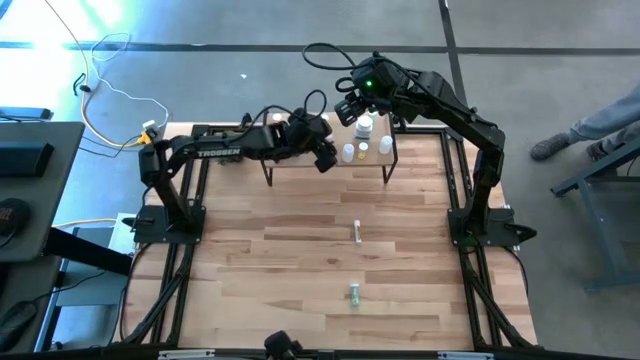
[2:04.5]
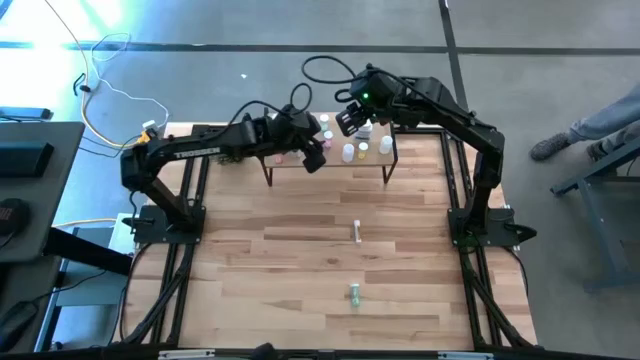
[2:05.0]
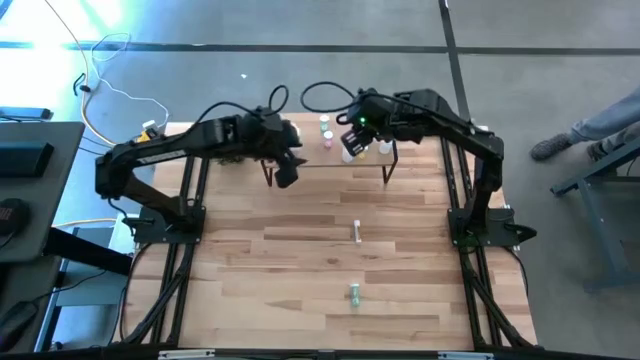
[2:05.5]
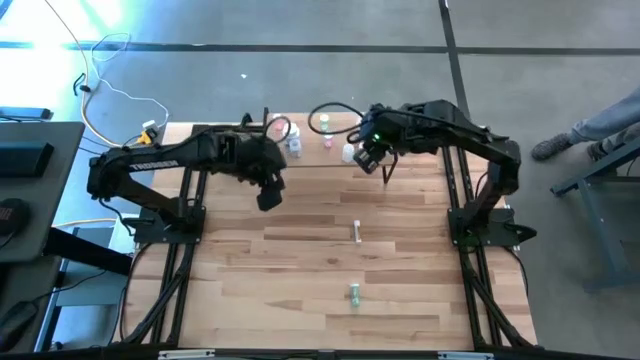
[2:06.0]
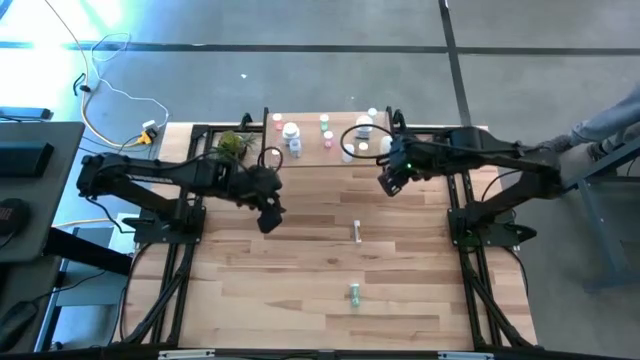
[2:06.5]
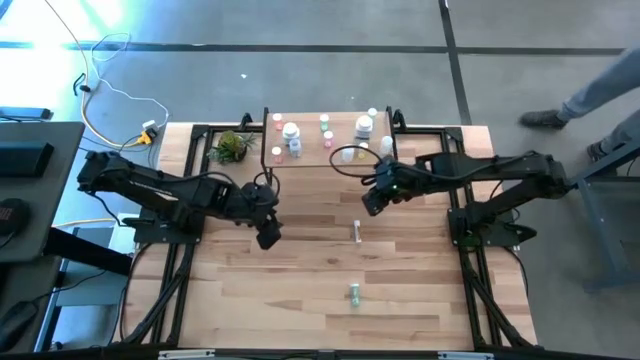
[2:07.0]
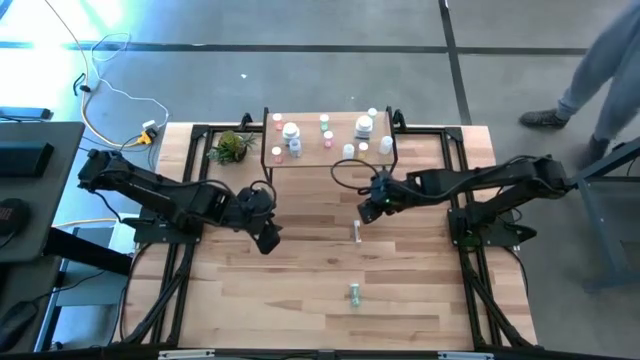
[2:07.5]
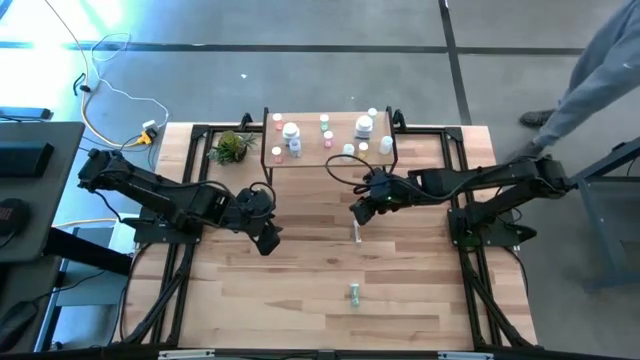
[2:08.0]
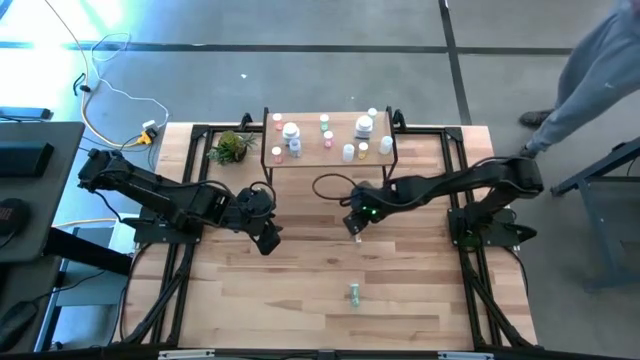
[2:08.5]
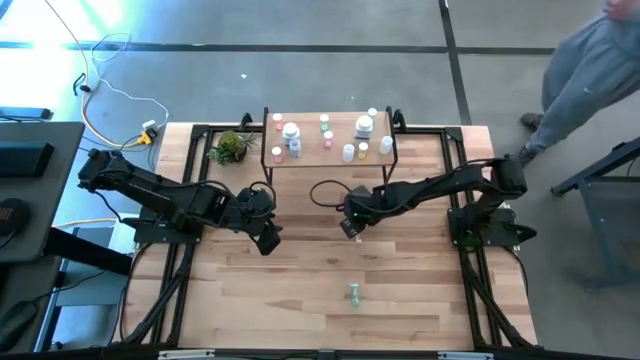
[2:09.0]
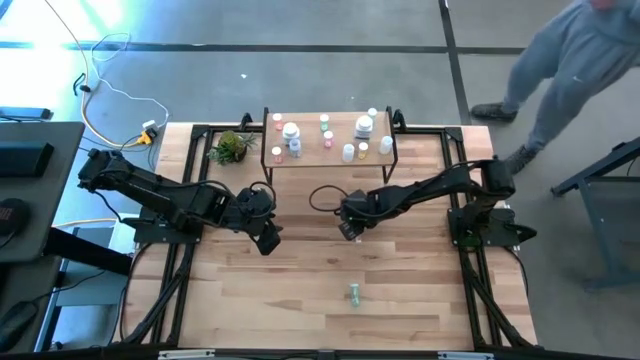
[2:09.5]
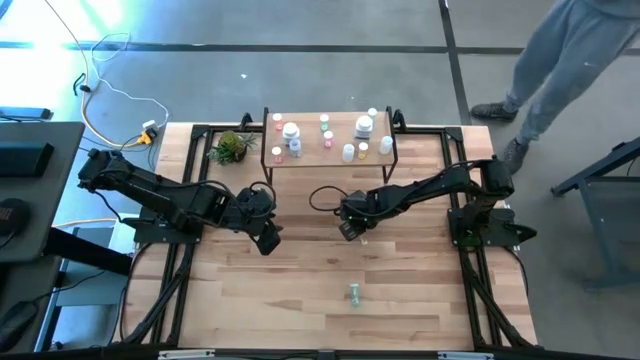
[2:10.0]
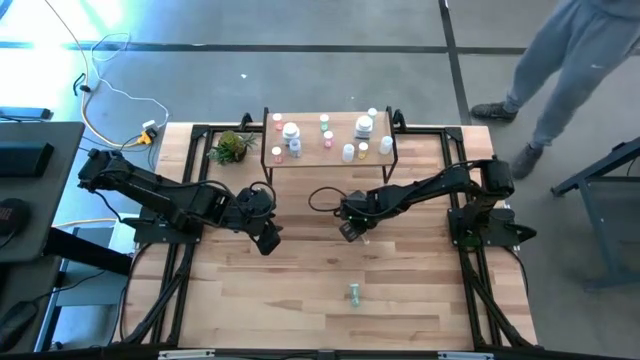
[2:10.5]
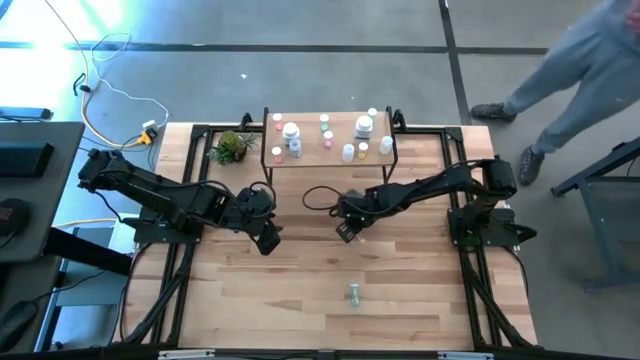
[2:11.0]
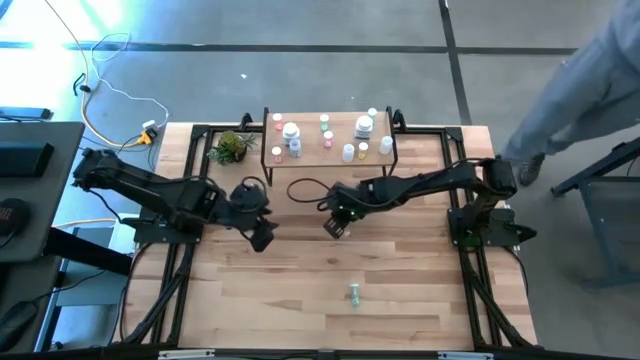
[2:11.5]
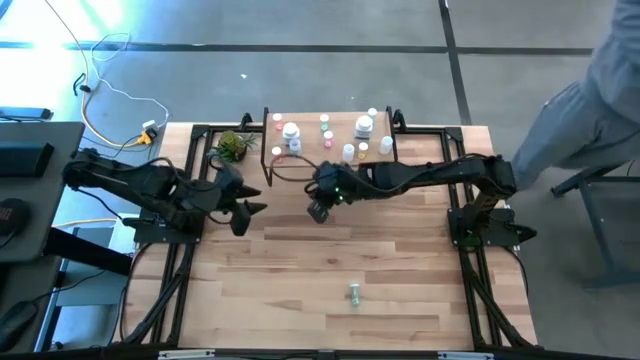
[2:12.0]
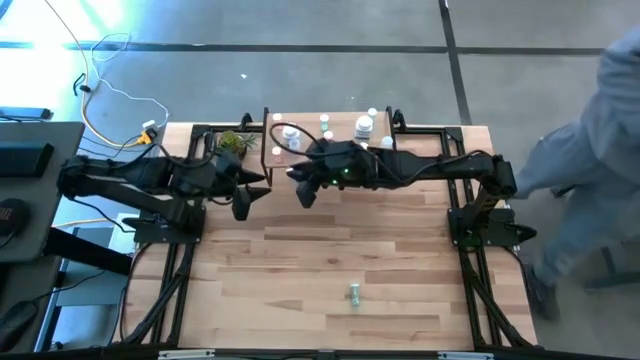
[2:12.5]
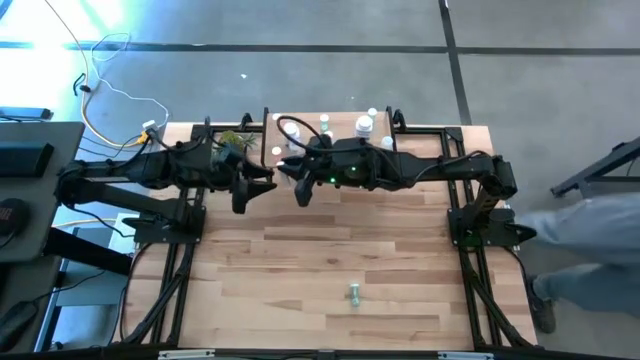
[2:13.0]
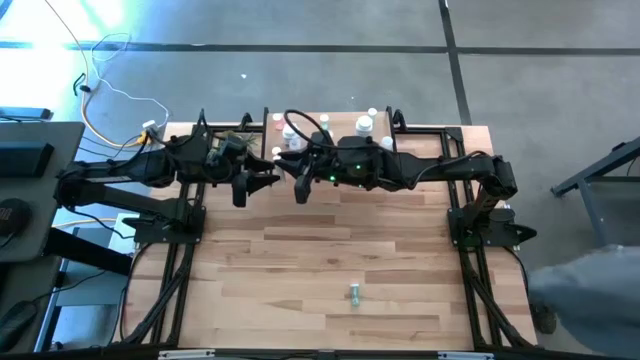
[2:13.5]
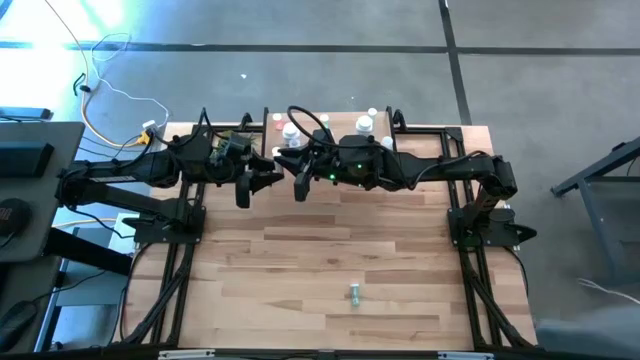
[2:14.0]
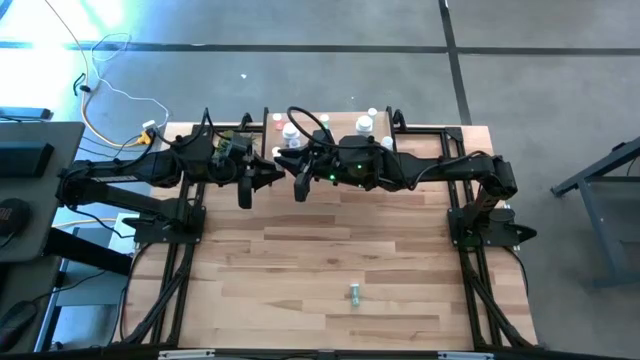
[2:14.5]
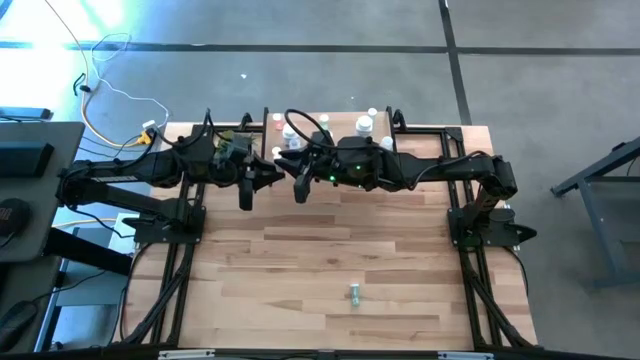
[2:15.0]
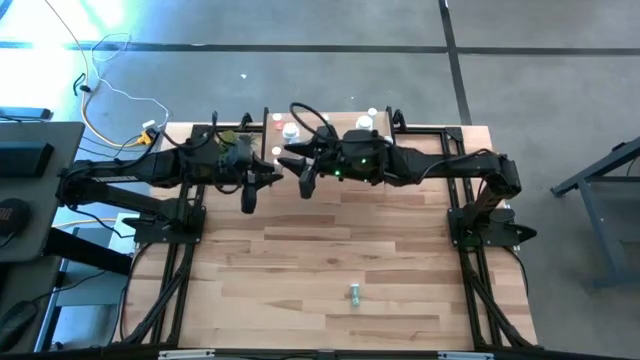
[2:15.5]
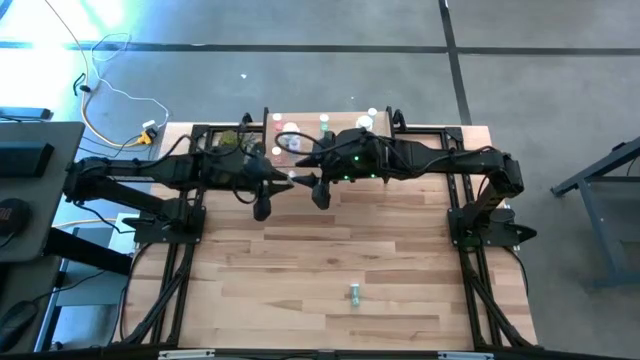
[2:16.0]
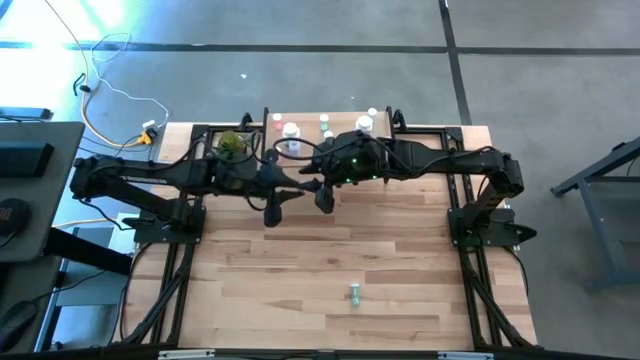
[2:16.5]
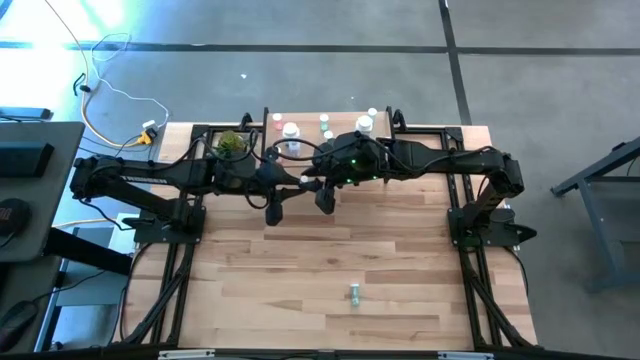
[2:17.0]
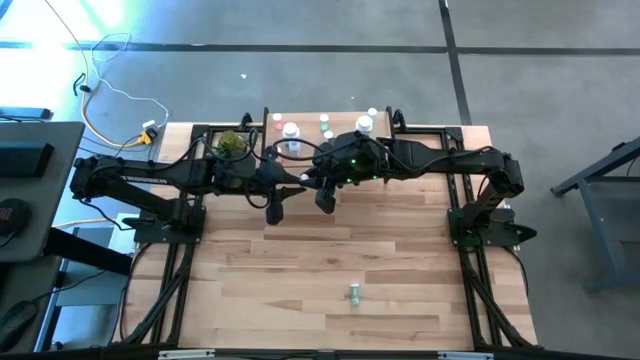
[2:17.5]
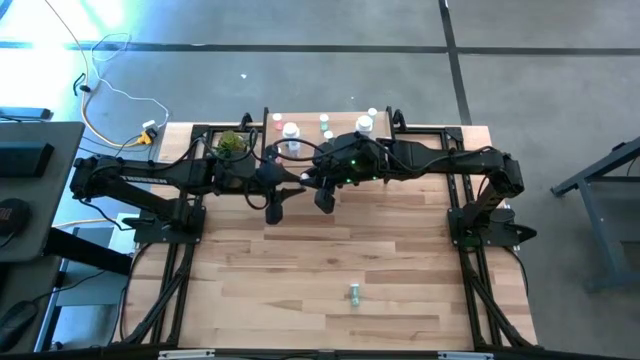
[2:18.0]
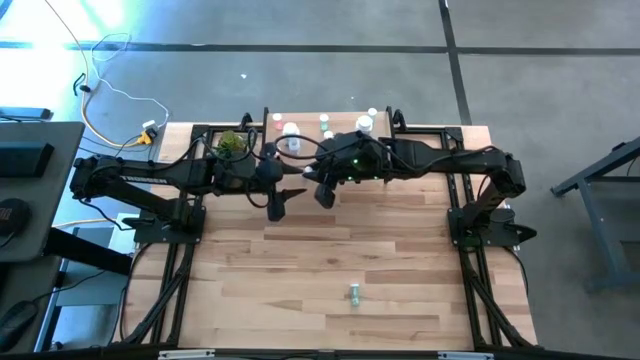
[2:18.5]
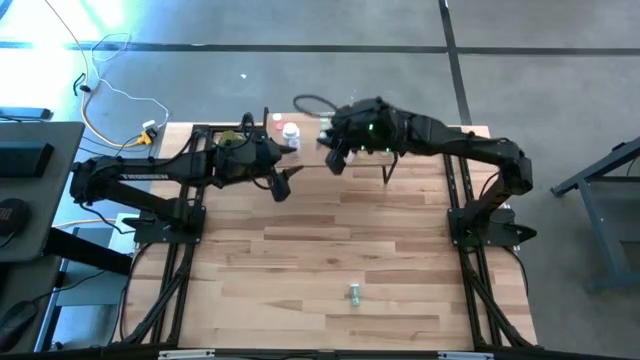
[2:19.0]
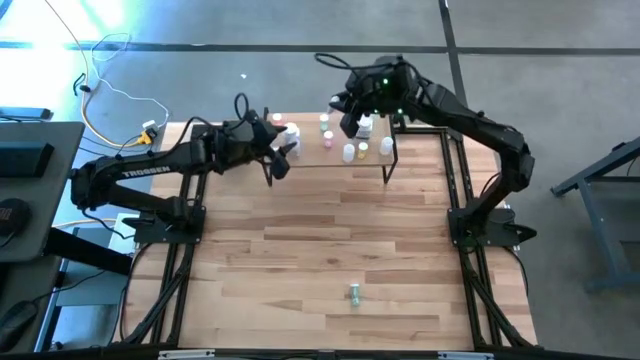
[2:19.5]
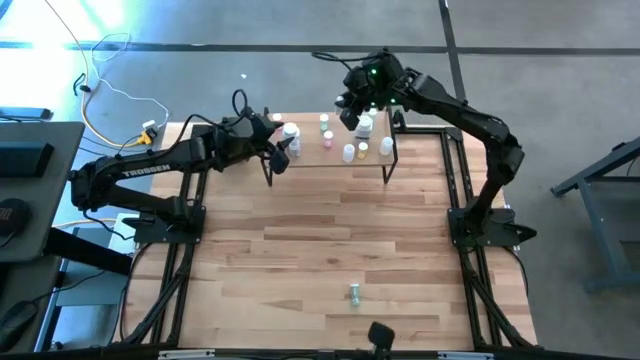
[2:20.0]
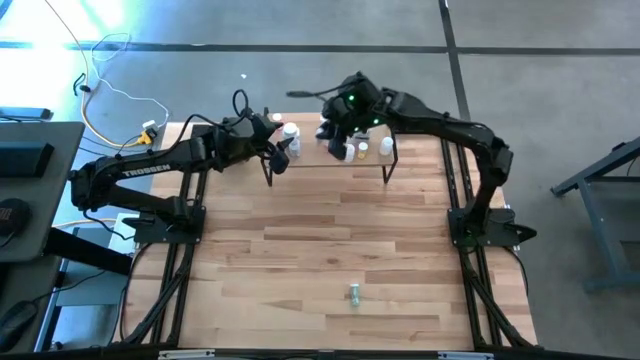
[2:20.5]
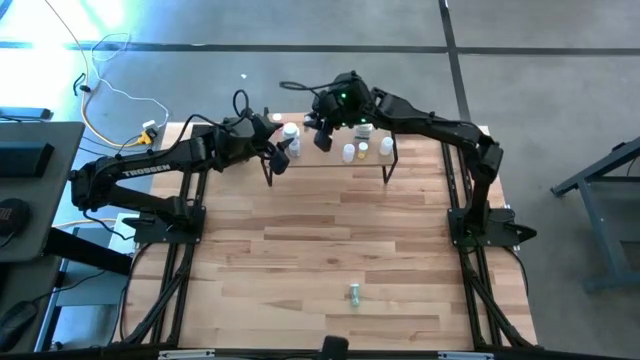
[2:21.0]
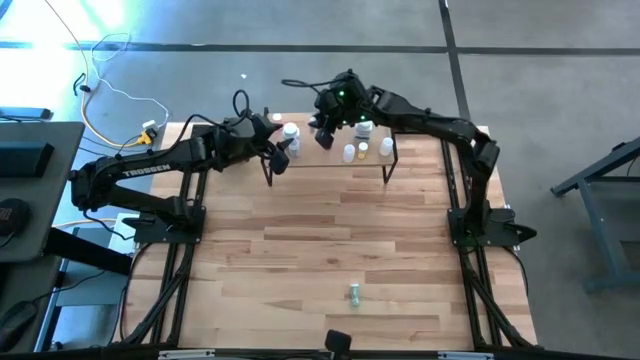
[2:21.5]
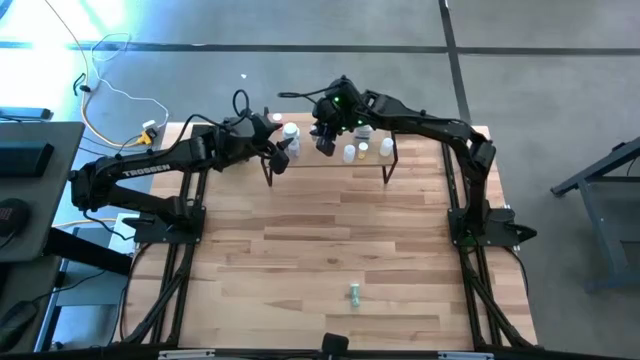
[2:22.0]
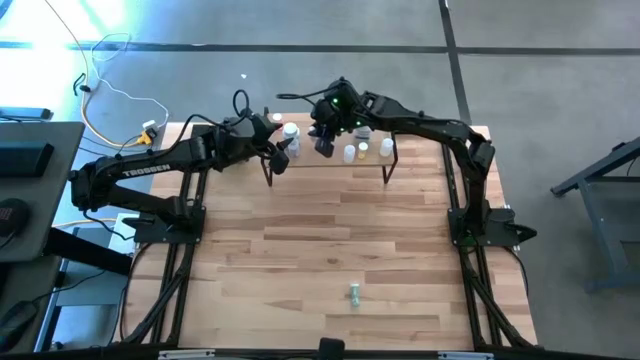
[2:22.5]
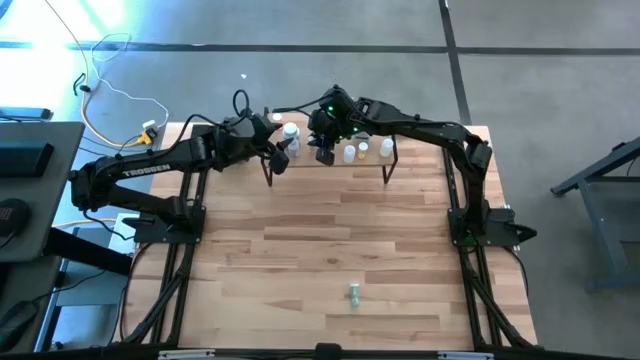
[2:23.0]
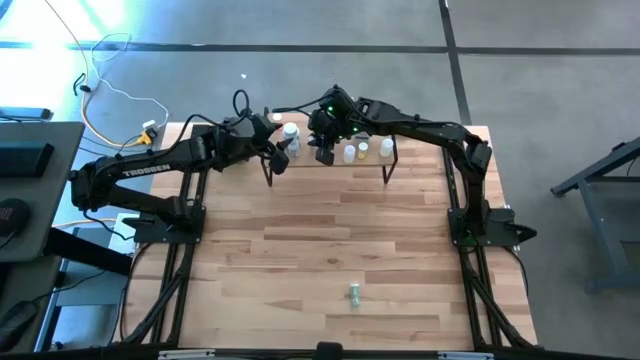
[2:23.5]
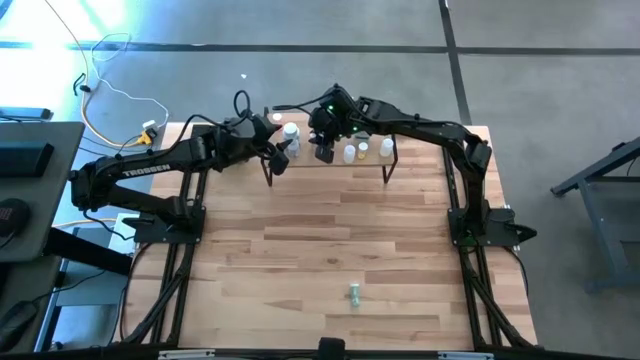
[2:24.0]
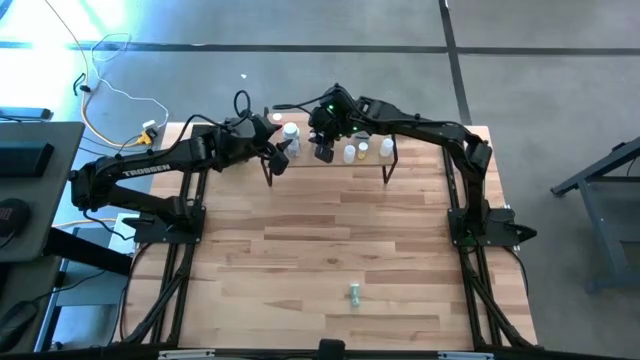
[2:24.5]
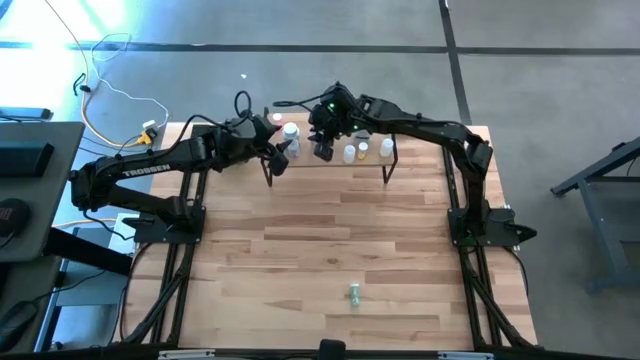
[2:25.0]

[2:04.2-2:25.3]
Task: Pick and place medicine bottles onto shelf by color
Put the yellow white pill bottle on the shelf
